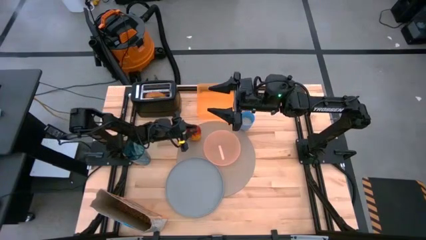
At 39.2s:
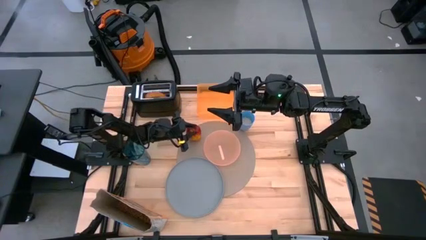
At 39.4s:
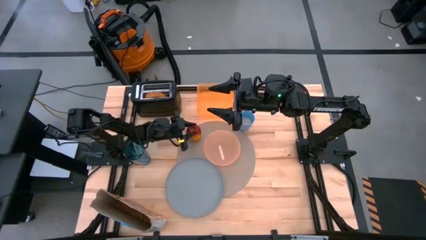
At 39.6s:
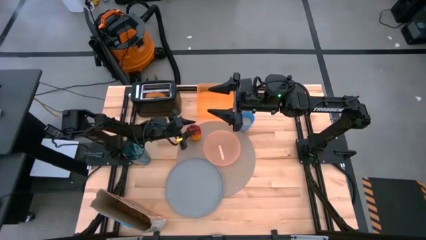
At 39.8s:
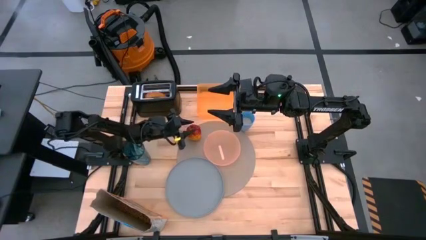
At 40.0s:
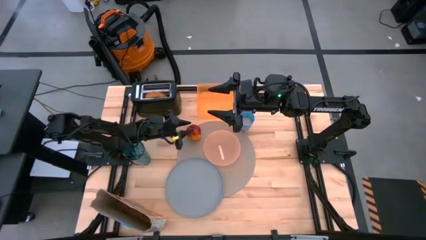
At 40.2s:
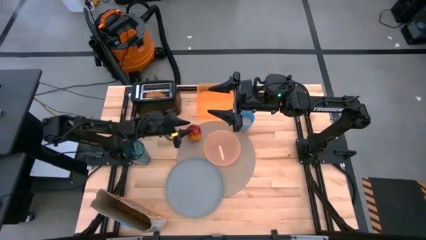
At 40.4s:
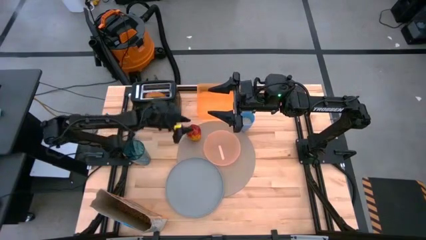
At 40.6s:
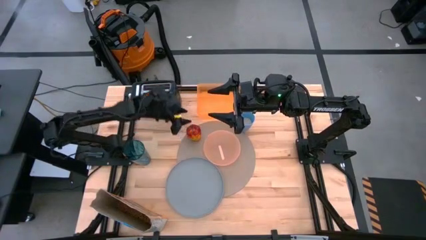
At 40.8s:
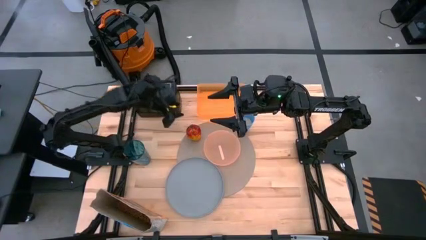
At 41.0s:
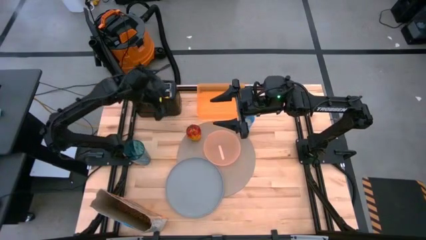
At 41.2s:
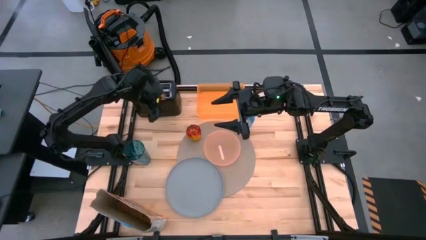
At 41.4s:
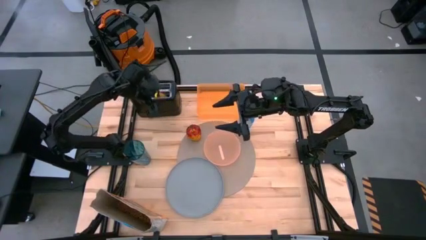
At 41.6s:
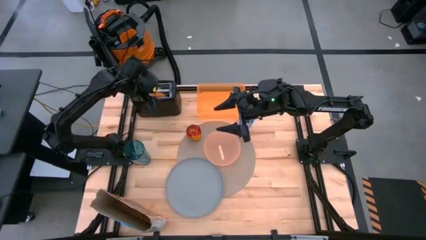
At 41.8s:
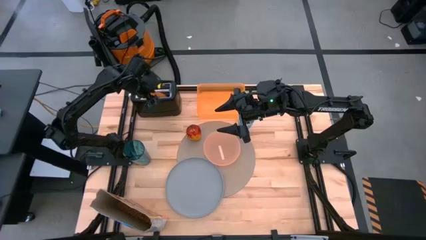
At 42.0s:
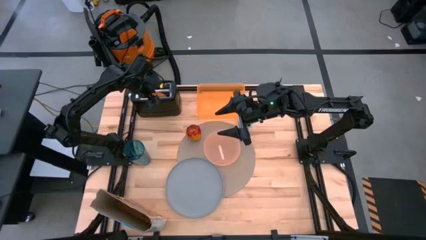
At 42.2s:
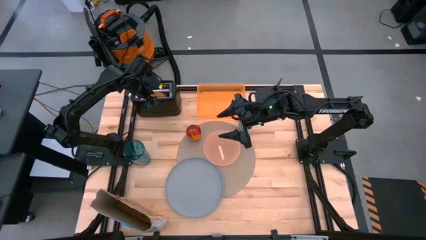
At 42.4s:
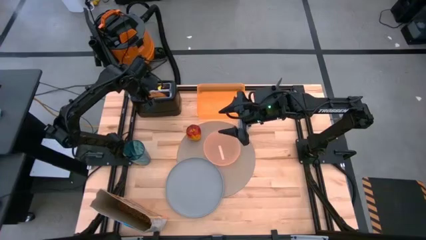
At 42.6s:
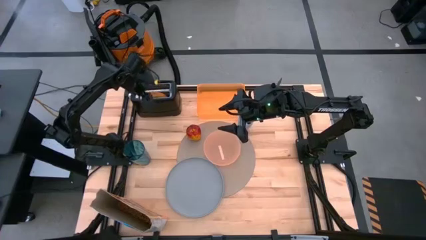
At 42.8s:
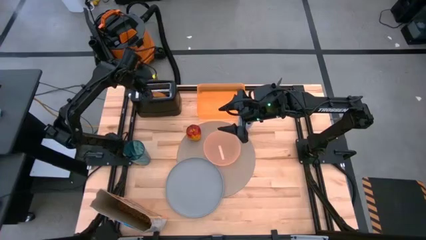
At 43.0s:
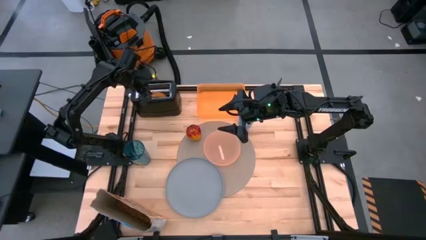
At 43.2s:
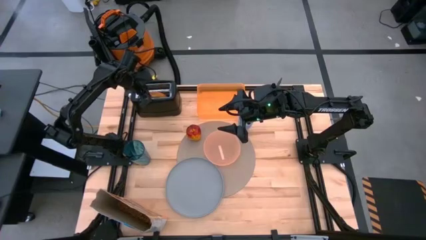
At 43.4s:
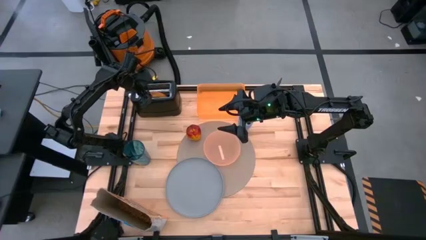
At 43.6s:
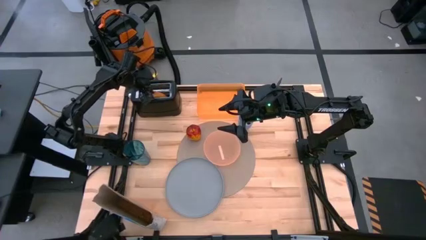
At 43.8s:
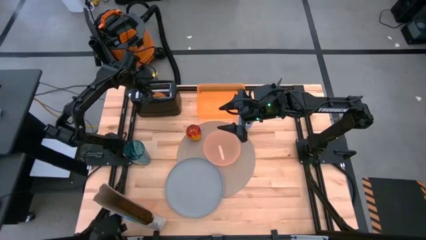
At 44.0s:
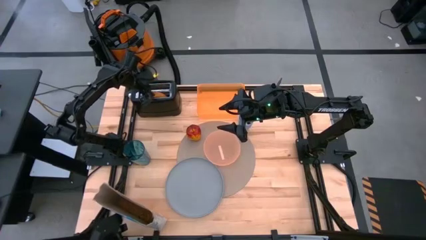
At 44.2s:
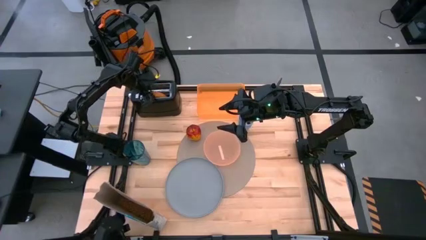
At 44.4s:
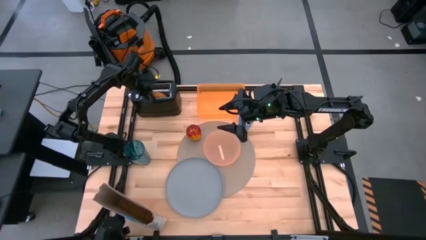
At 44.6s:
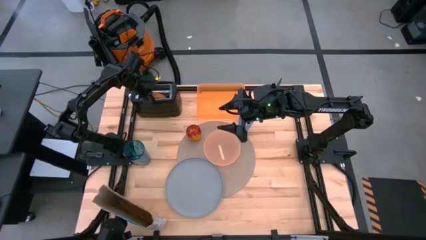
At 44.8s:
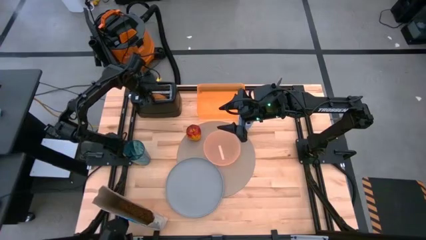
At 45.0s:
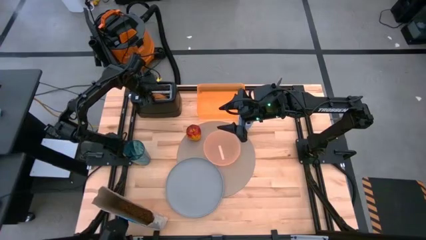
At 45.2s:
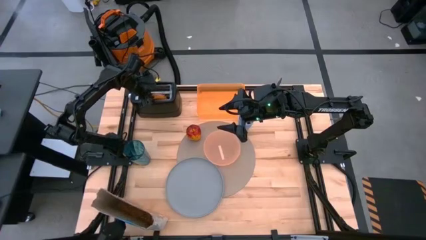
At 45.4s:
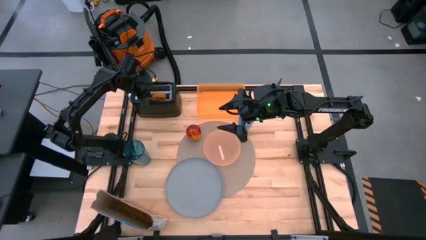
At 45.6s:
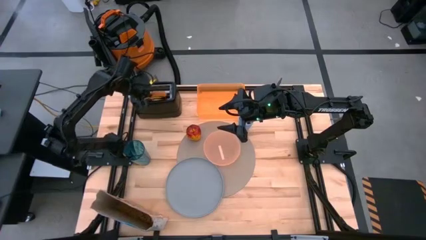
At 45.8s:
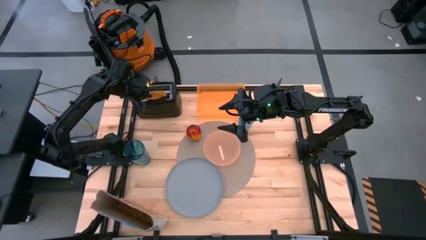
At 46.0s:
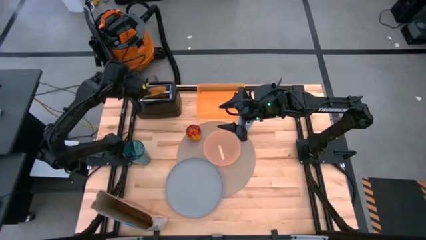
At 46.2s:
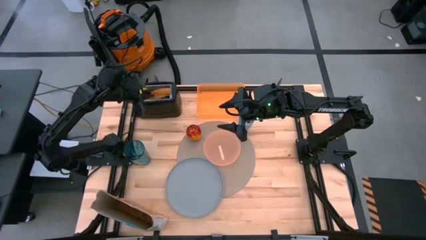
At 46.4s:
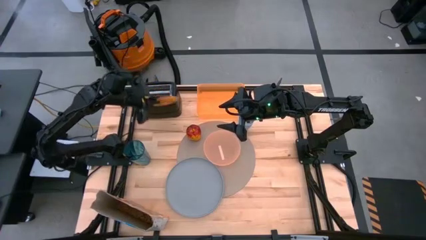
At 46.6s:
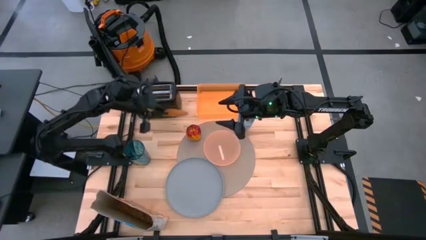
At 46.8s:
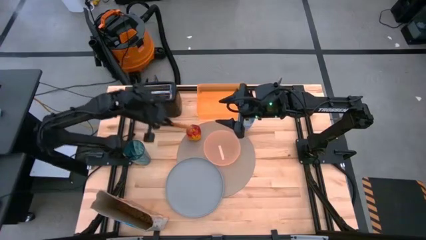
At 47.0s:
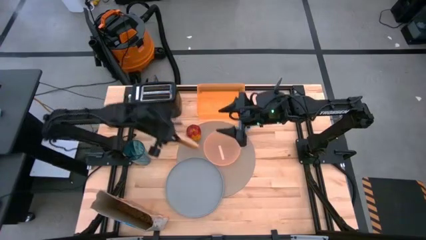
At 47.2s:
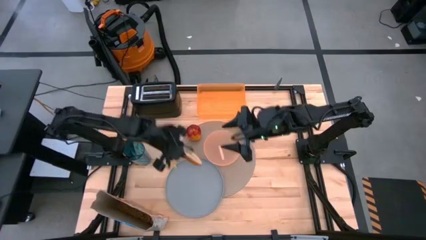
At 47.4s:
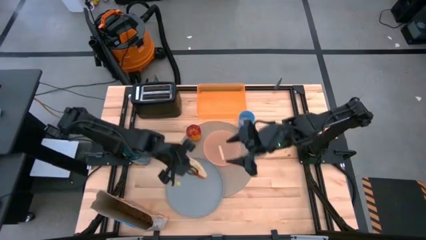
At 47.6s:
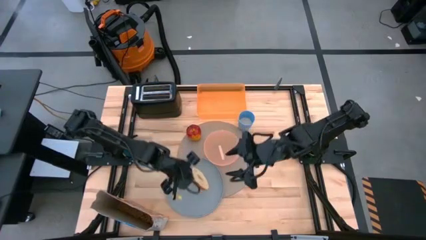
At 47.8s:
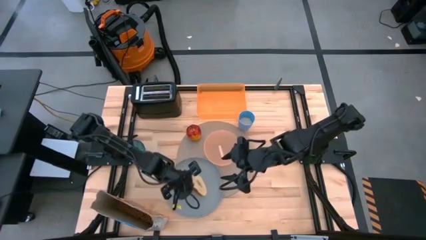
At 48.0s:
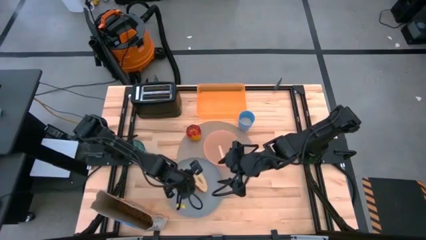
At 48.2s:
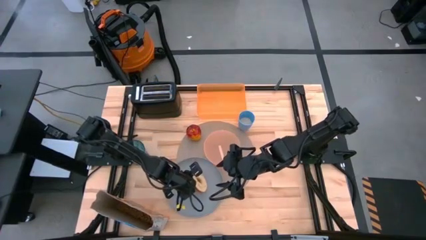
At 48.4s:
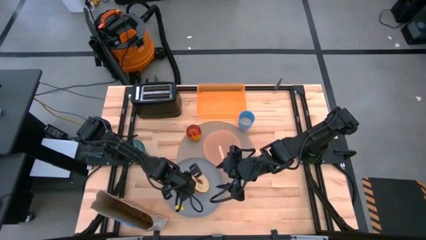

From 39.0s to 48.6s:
Task: Arrange a breakfast setting
Put the toasted bagel on the blue plate

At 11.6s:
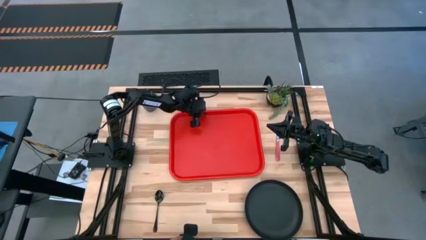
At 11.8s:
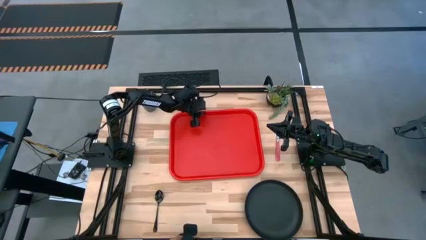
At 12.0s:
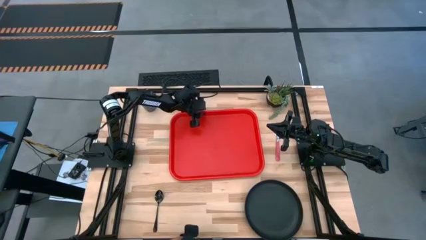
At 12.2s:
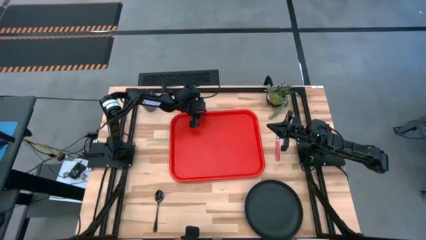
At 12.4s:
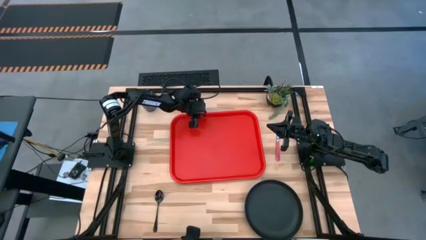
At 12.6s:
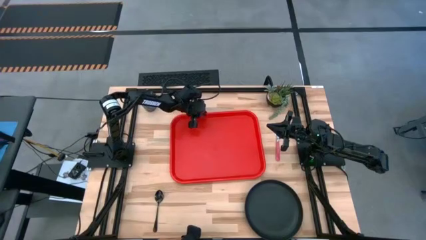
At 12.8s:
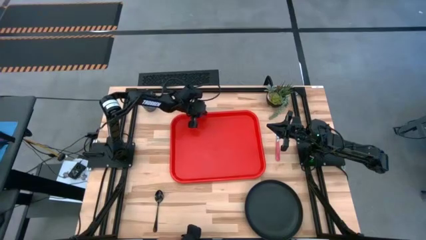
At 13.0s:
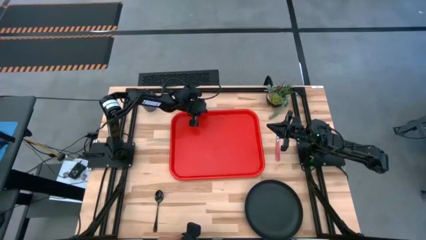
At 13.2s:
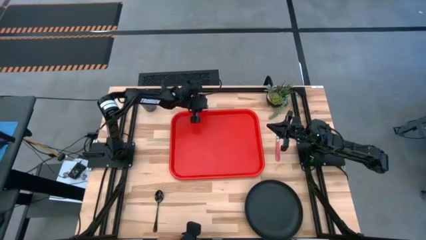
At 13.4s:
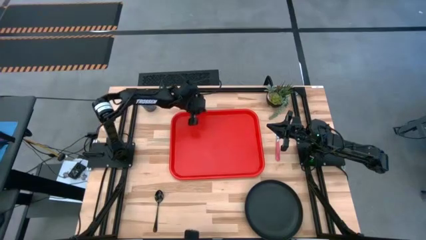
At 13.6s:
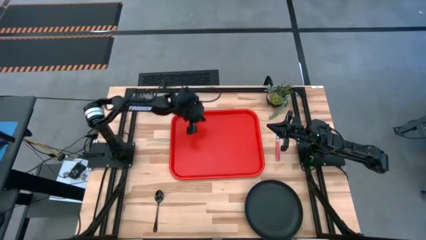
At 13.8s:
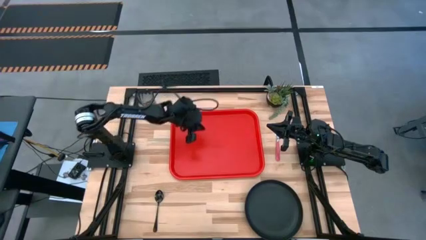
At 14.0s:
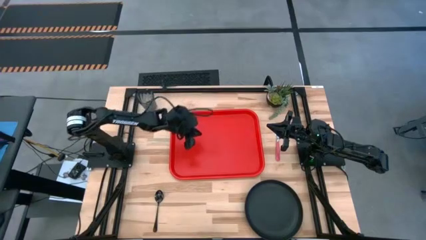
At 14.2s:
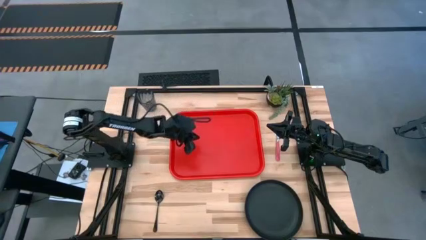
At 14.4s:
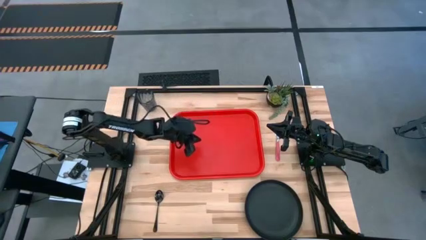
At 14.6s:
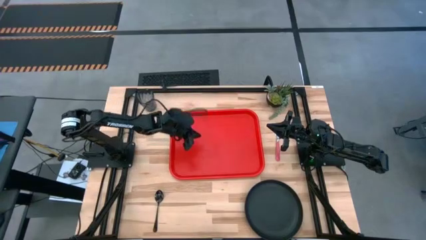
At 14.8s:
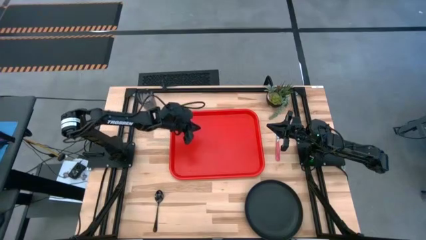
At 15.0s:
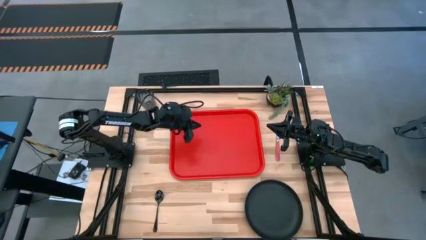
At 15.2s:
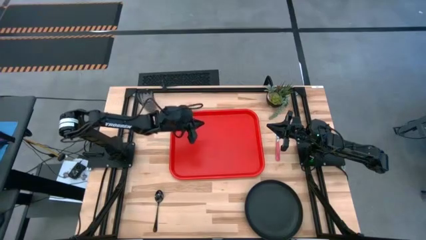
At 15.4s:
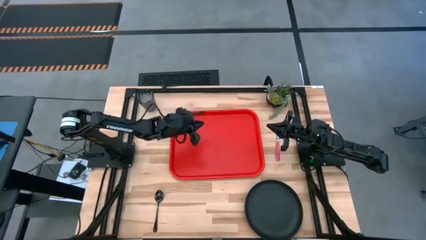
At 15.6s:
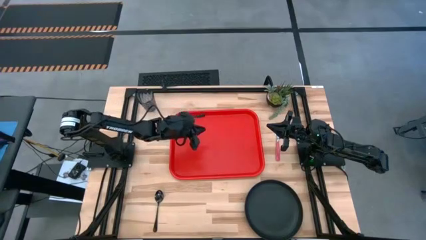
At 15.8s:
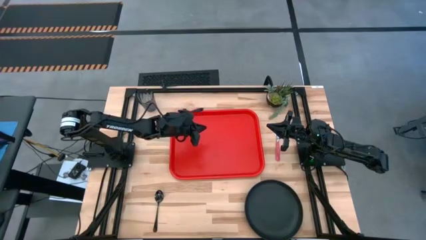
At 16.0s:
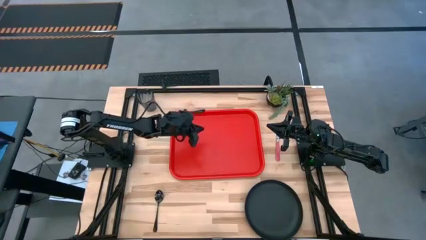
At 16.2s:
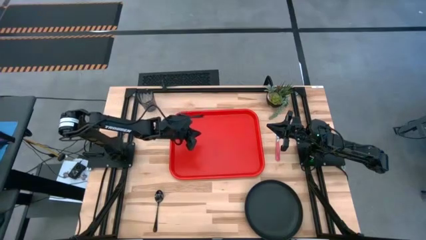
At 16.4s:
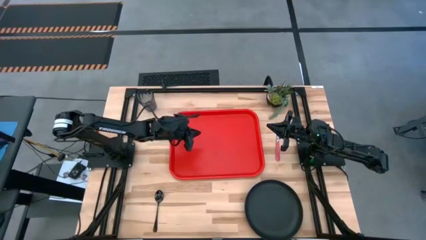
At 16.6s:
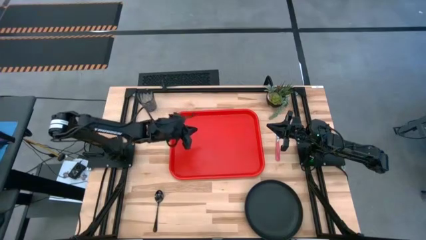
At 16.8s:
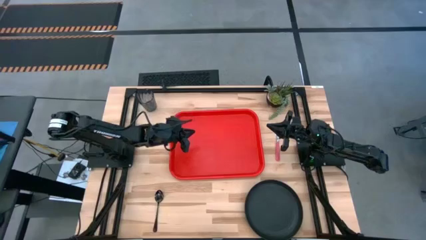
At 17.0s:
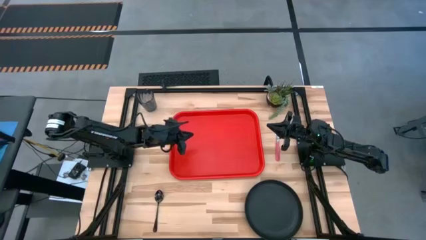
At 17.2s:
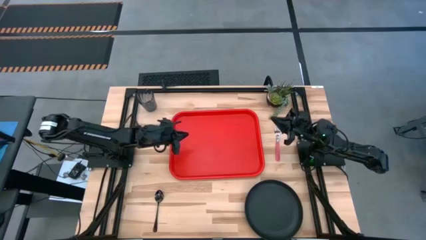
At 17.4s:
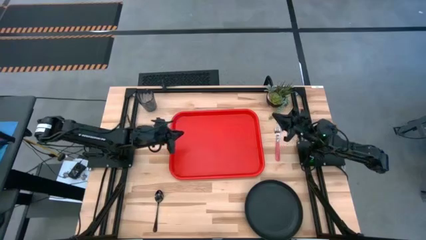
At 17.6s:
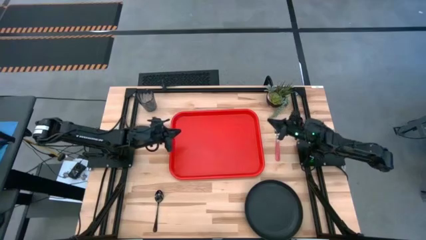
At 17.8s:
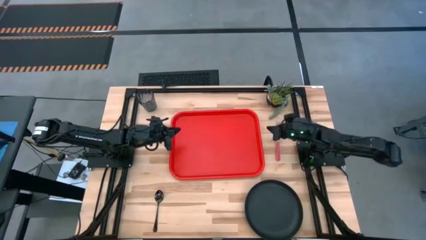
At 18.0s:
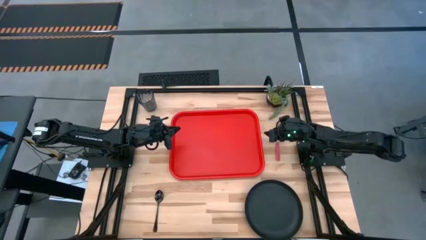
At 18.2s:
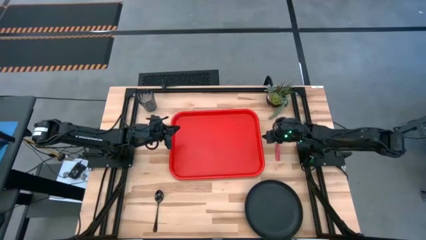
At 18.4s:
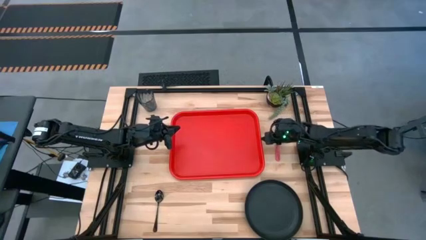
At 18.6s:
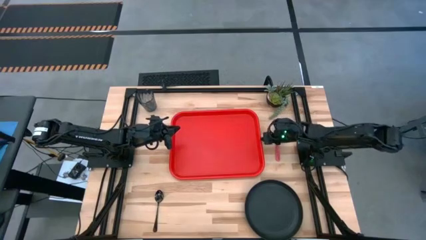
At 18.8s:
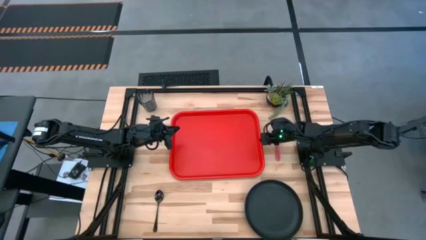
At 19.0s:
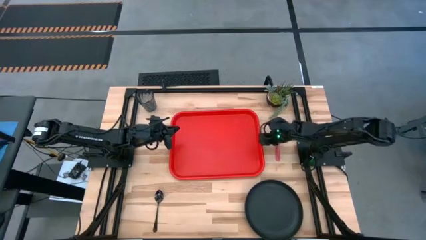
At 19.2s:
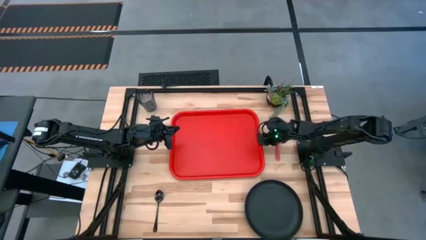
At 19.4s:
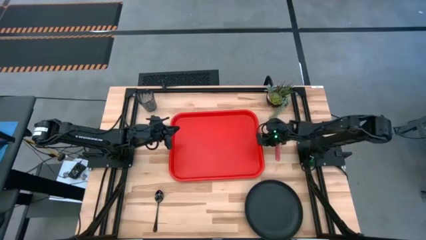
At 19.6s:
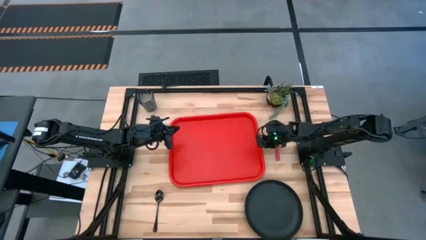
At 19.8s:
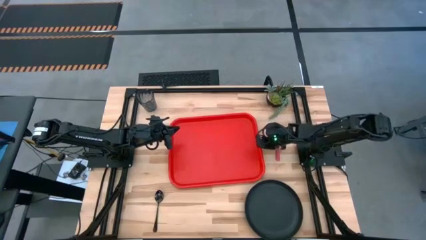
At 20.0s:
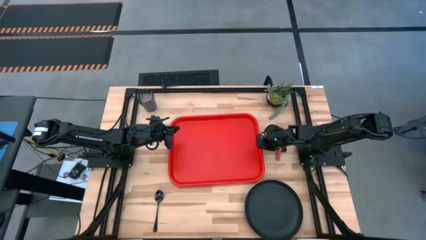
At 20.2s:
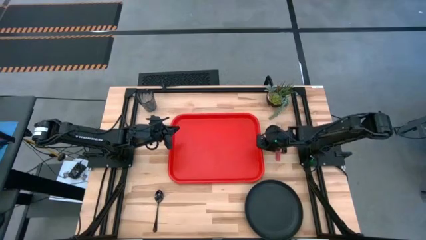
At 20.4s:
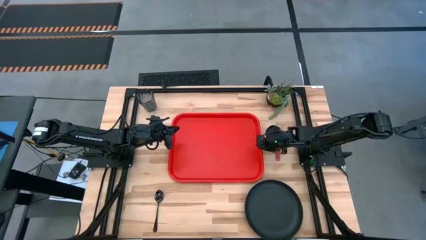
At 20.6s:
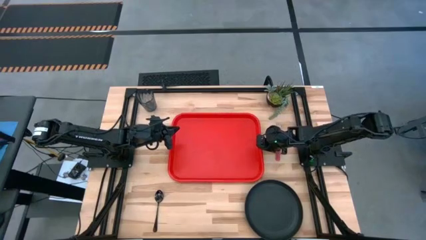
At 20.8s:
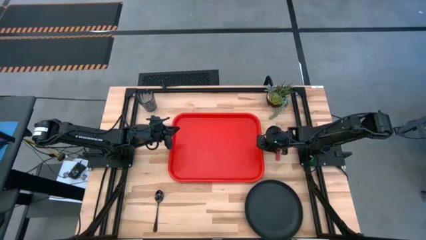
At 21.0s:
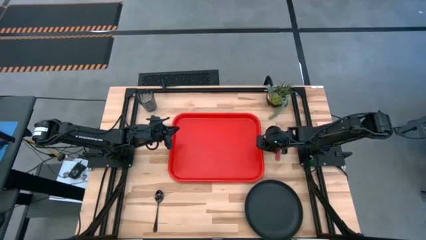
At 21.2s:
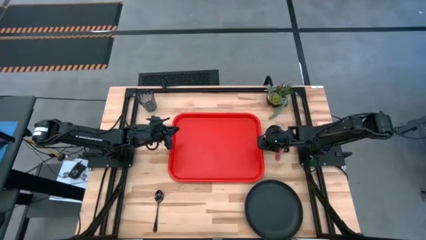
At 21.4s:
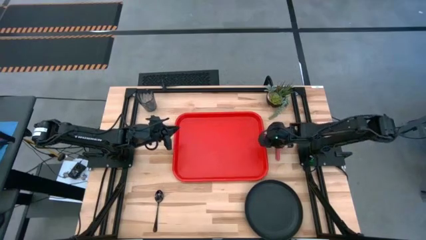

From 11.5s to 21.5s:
Task: Pick and place plate/cup/fork/spoon on tray
Adjust the red tray
